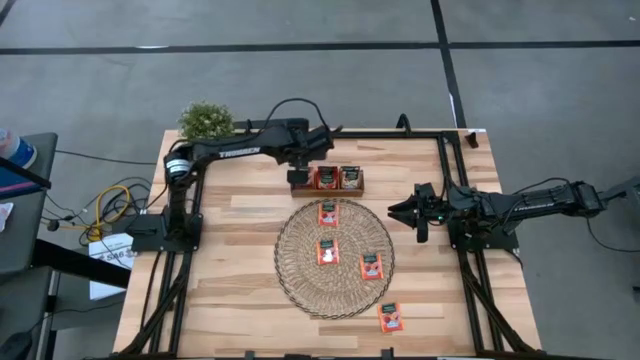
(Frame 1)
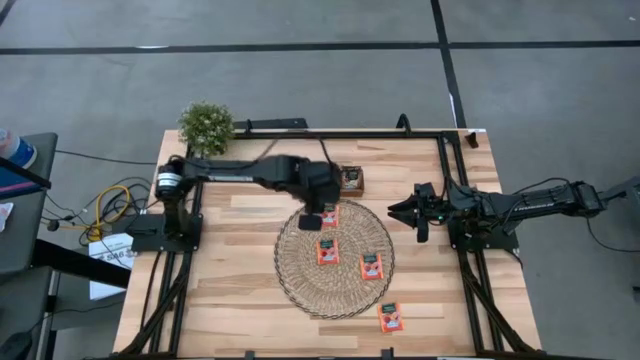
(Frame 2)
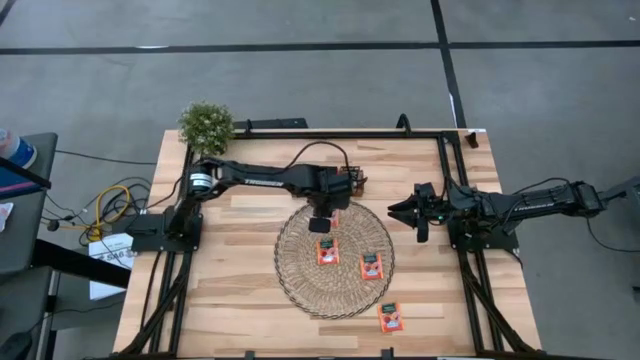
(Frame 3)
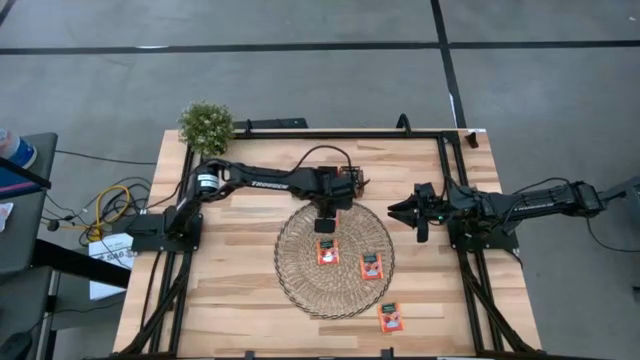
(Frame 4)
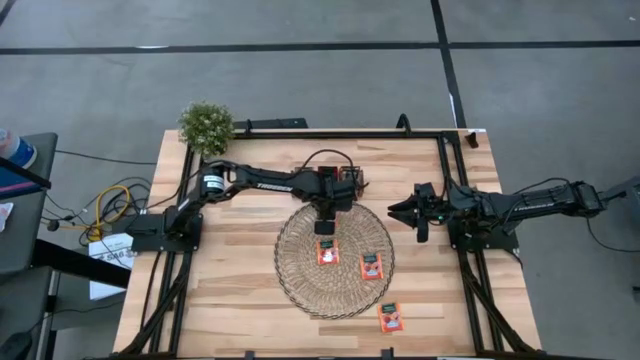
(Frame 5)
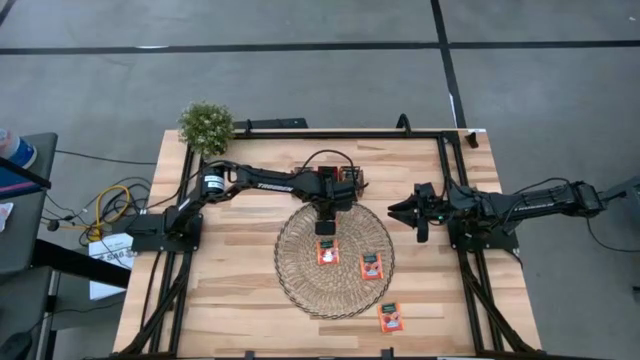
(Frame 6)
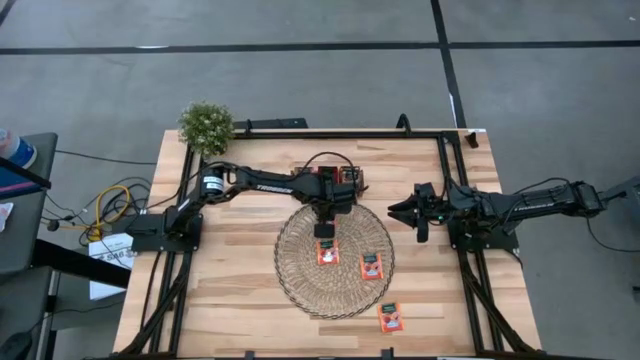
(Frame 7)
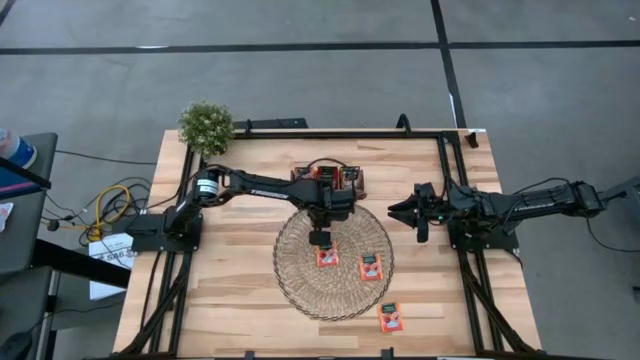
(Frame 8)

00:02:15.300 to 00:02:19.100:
Task: Pick & Place Tea
Put the orange tea bag into the left section of the wooden organizer

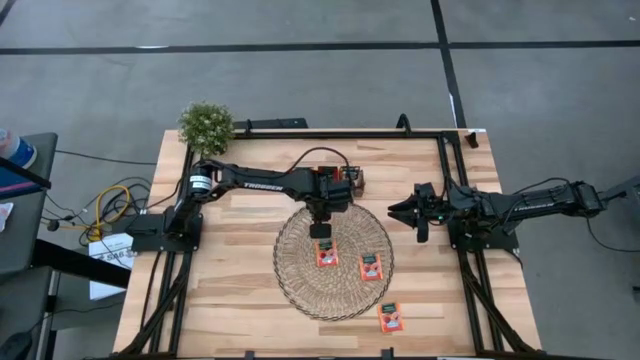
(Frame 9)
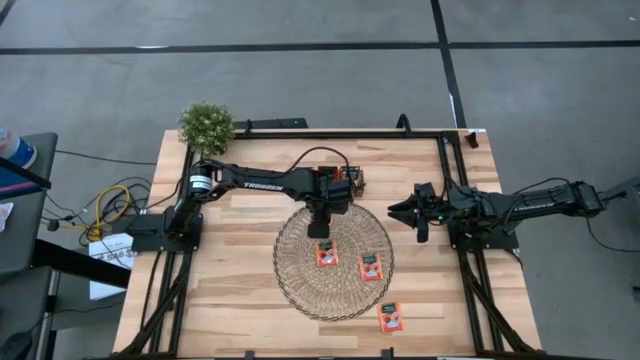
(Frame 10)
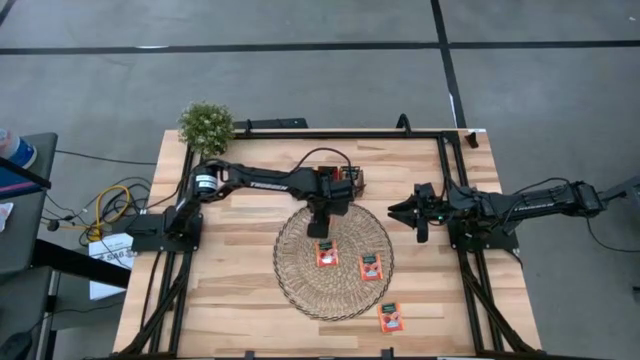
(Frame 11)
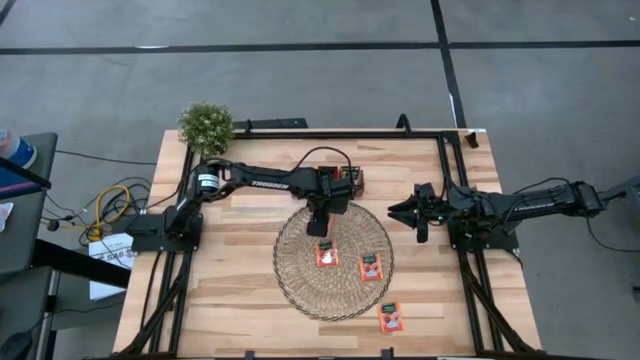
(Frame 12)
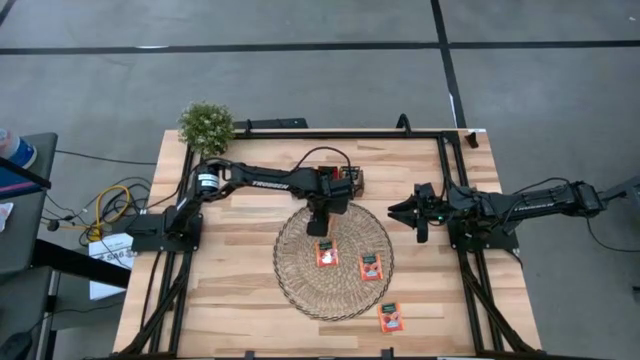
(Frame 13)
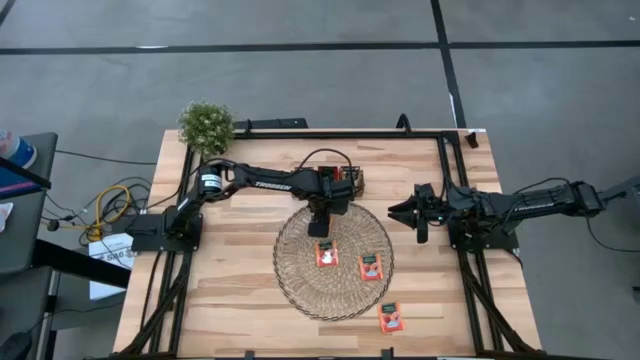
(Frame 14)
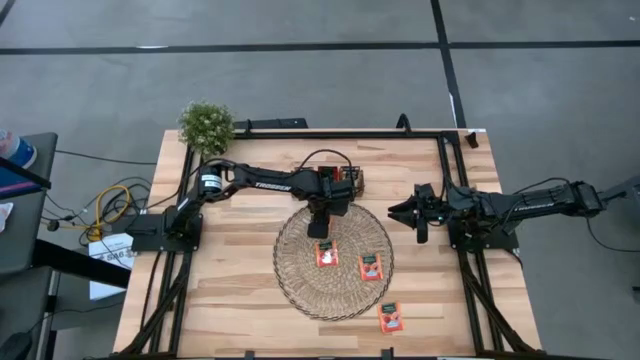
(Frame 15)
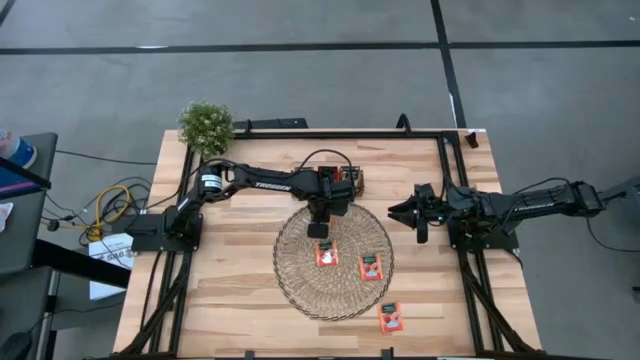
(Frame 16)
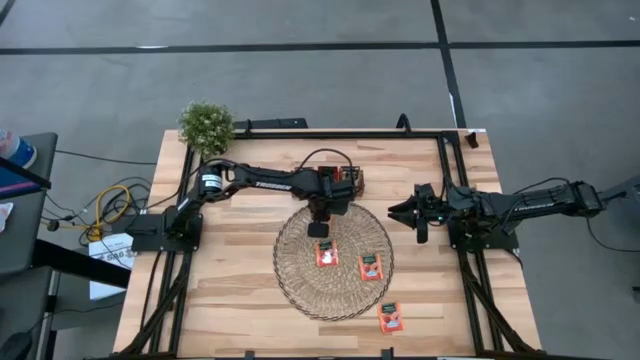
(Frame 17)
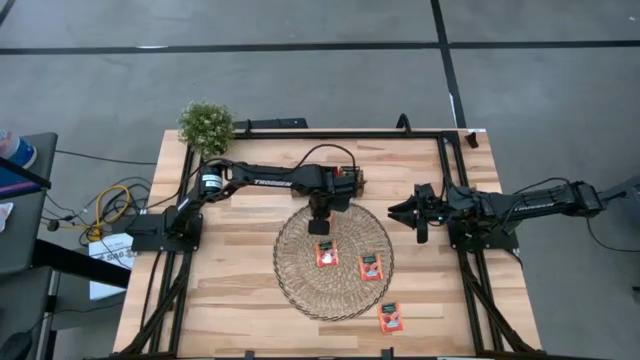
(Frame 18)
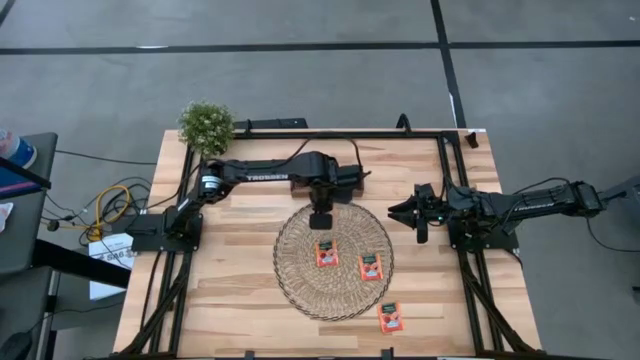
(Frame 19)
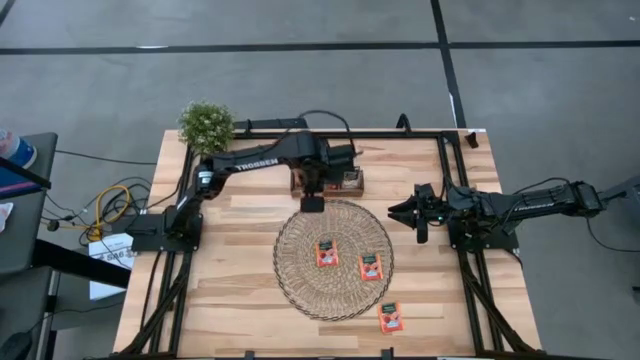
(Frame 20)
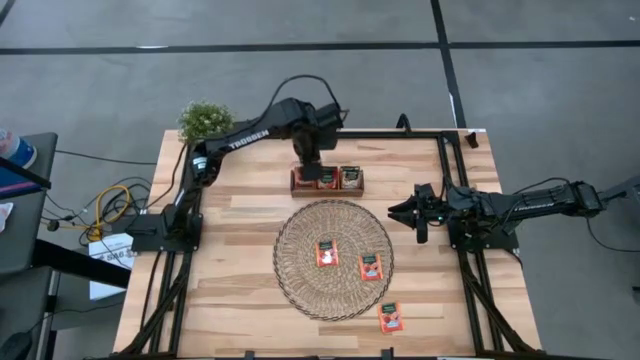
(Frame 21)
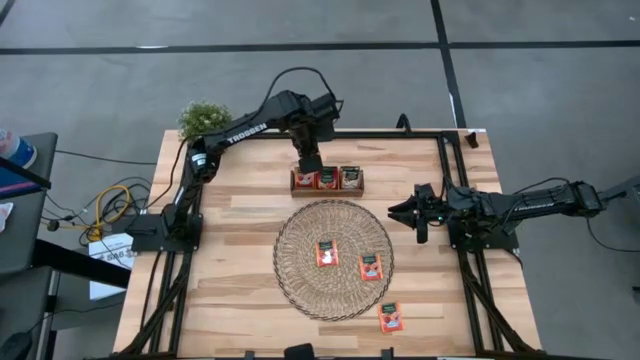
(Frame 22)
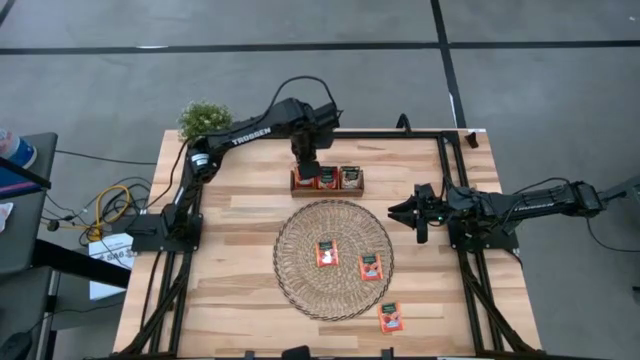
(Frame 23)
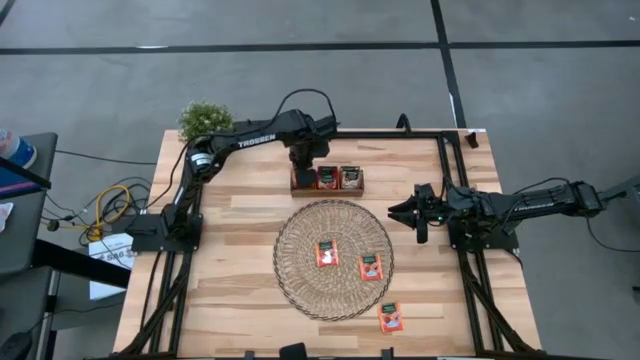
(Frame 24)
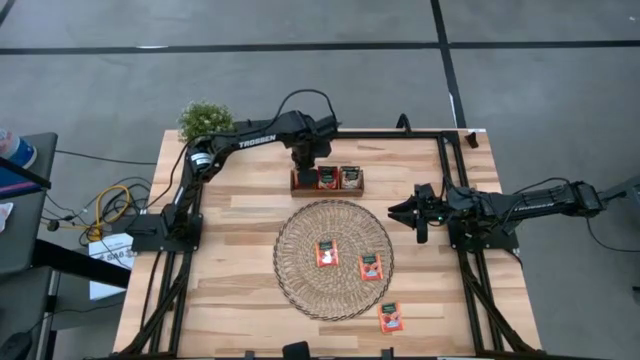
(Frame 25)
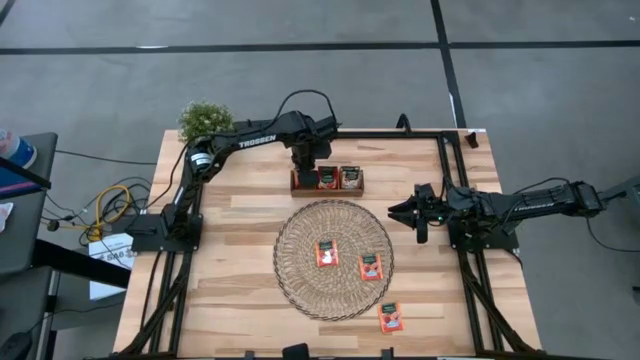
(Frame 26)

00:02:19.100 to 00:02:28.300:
Put the orange tea bag into the left section of the wooden organizer

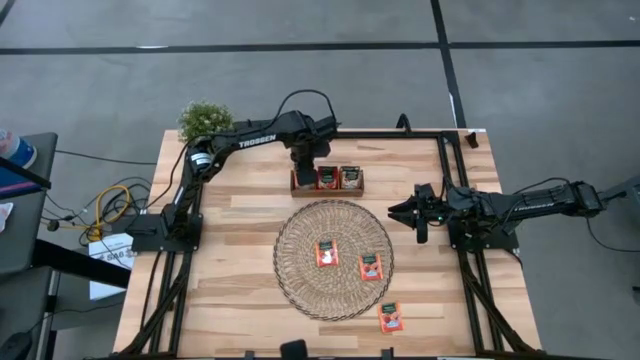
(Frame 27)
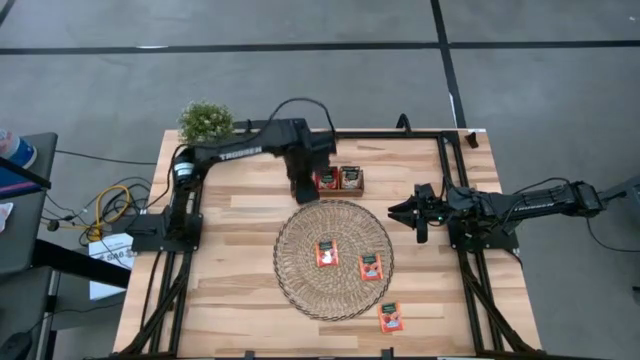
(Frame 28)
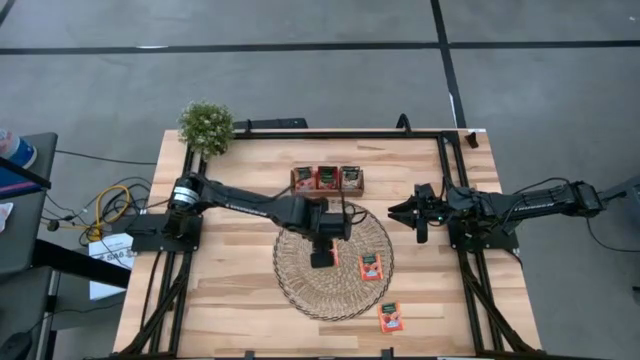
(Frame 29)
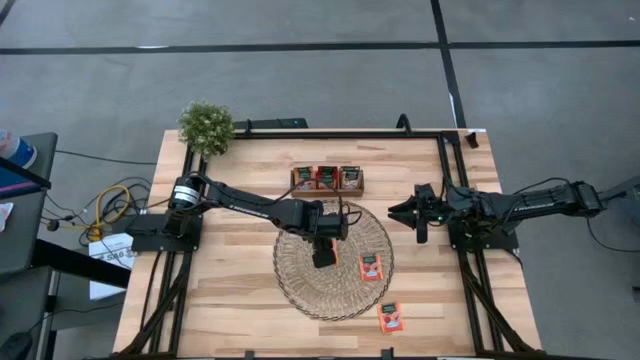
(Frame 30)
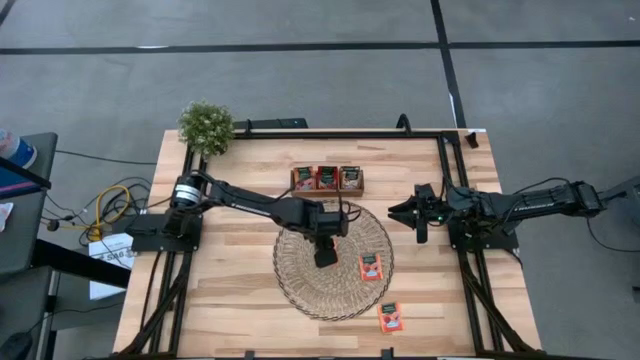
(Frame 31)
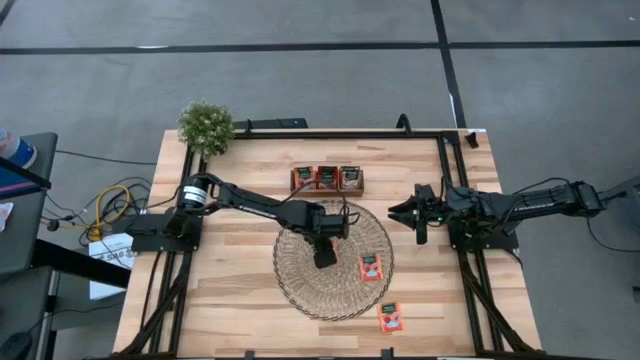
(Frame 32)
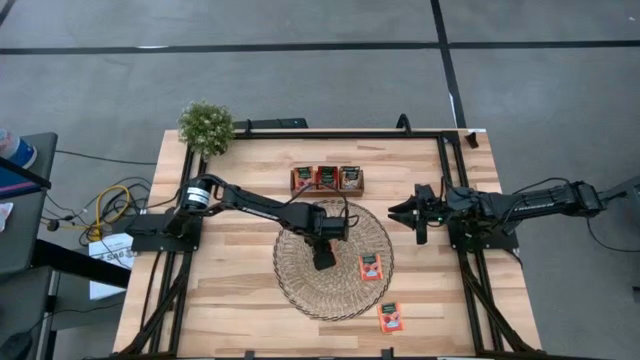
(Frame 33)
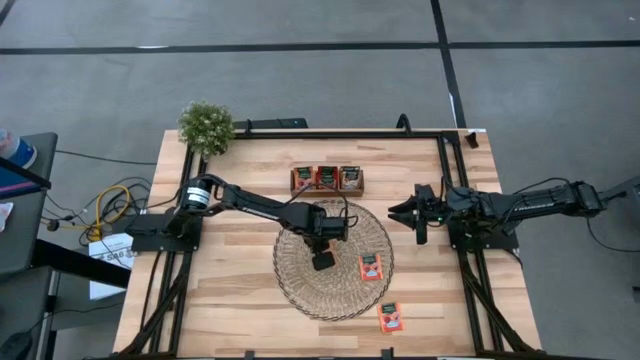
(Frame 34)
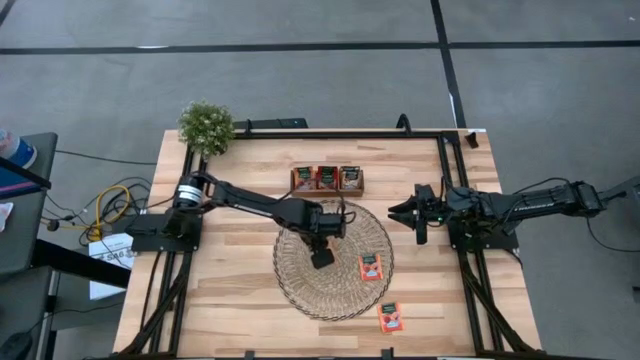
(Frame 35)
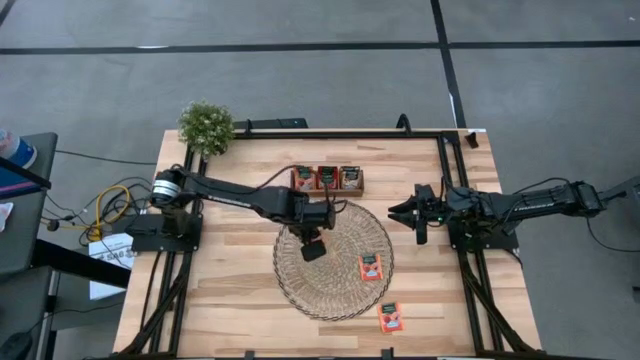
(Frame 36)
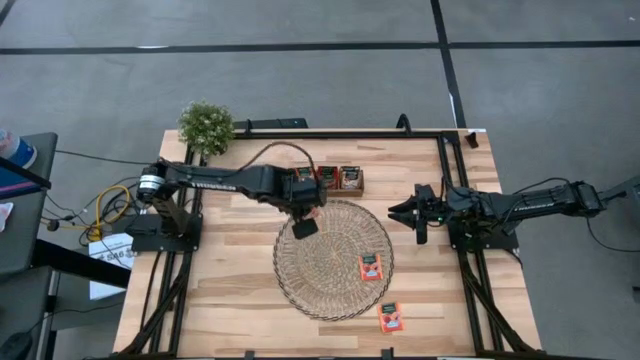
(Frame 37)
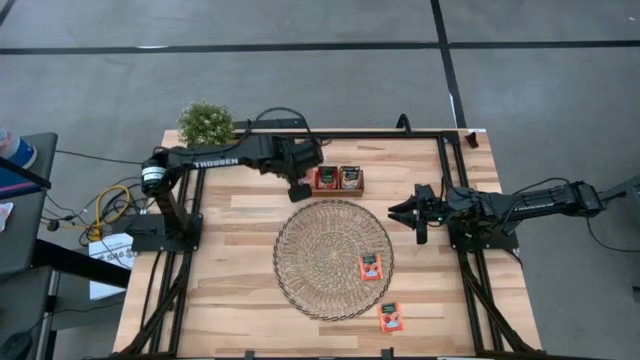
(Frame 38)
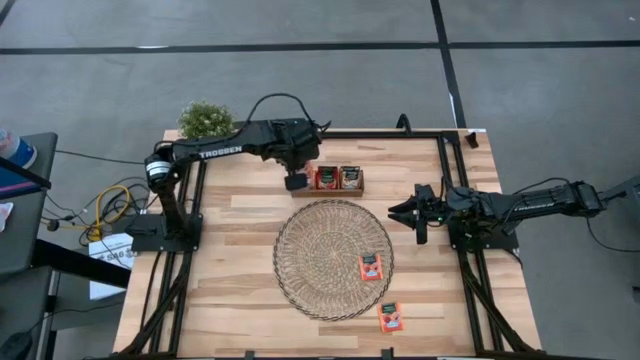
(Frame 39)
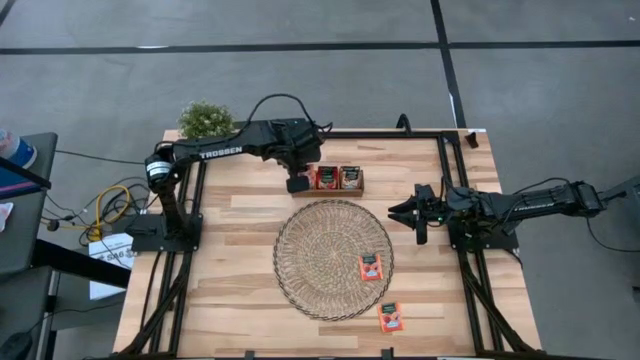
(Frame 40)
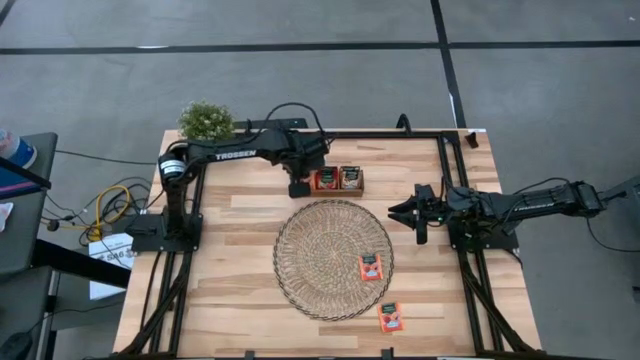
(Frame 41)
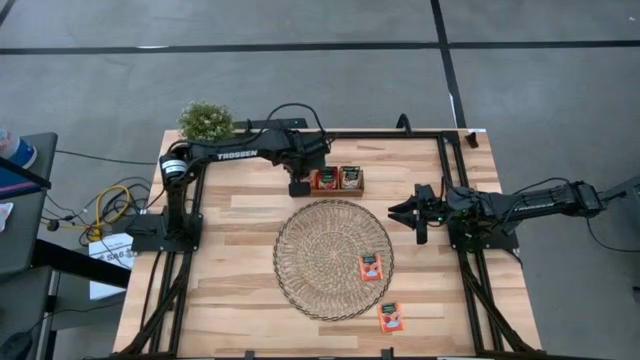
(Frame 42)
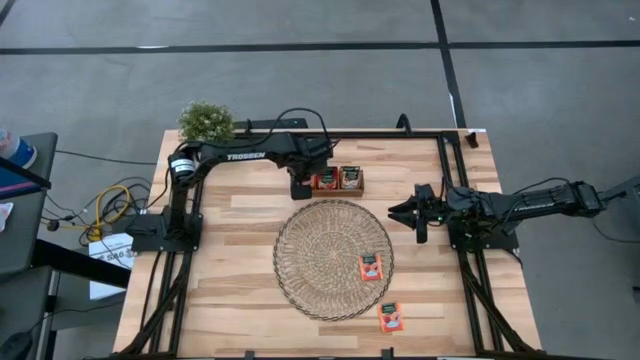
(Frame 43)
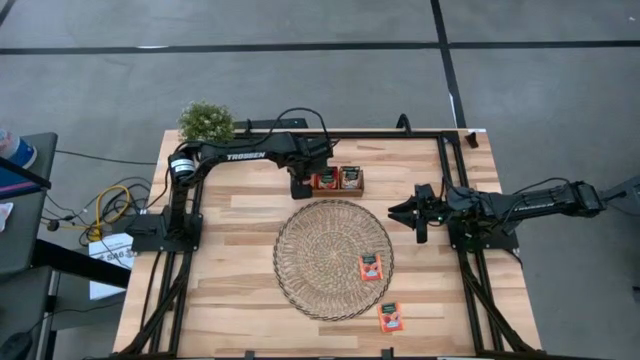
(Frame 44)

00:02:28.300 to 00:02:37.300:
Put the orange tea bag into the left section of the wooden organizer
